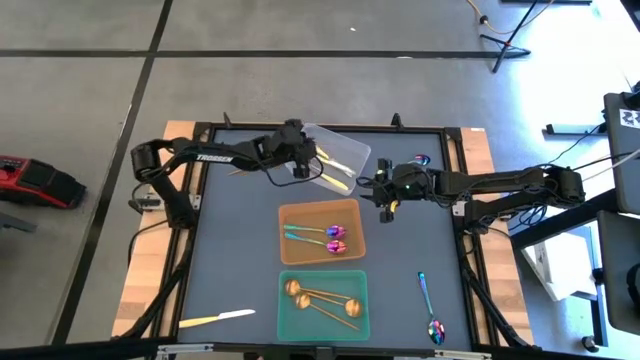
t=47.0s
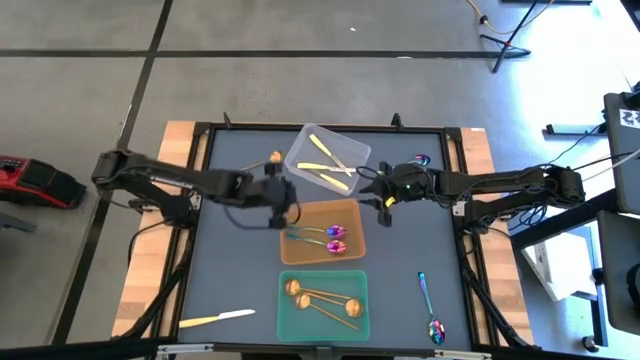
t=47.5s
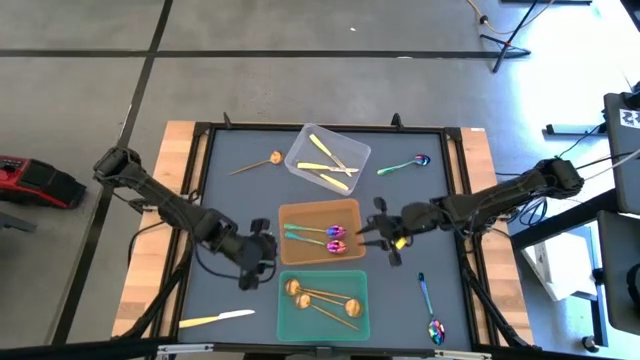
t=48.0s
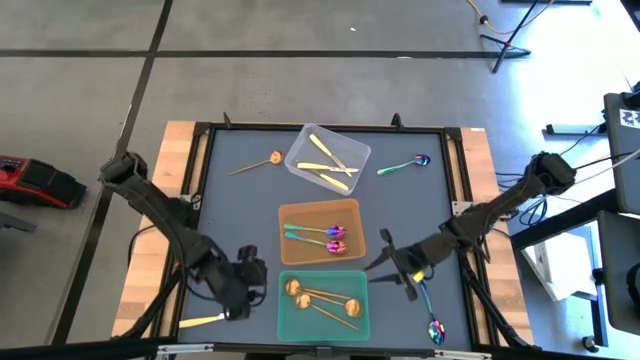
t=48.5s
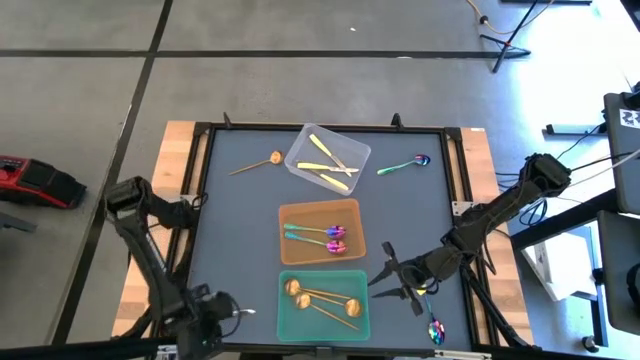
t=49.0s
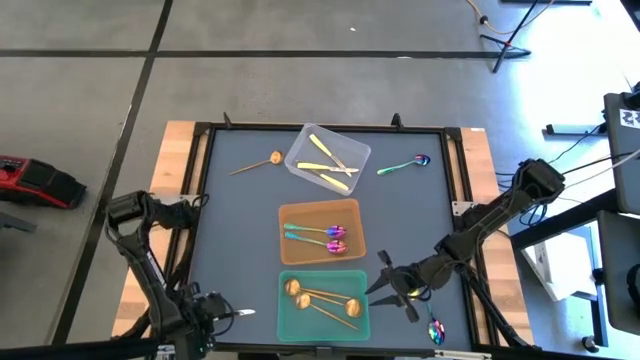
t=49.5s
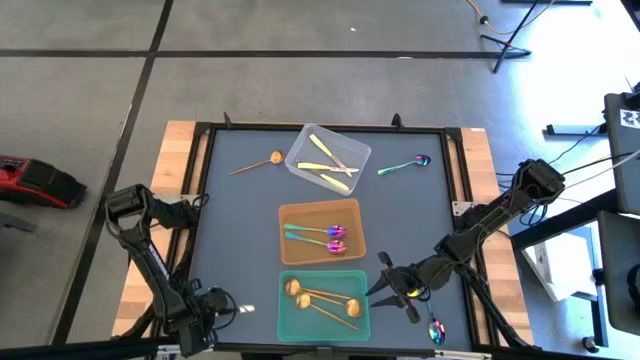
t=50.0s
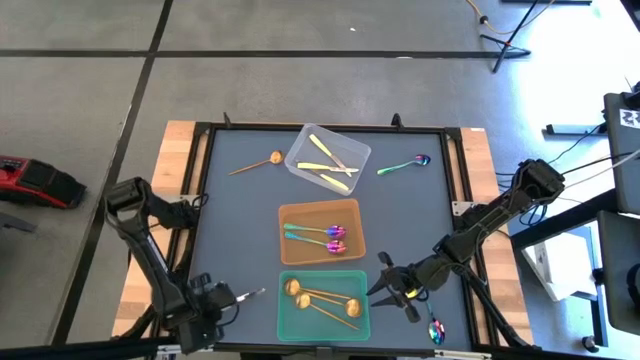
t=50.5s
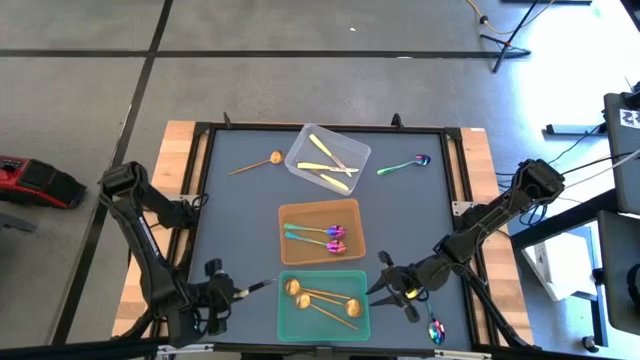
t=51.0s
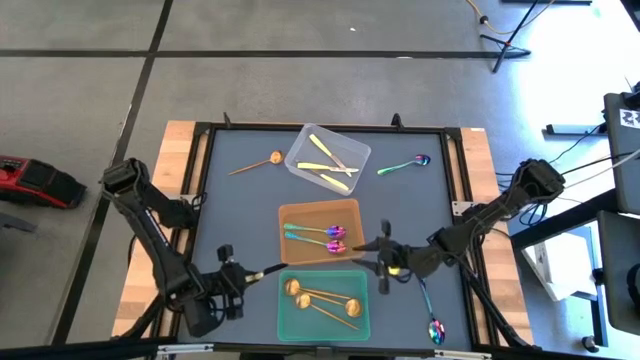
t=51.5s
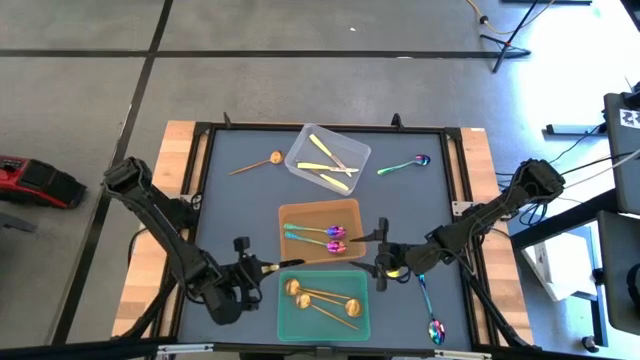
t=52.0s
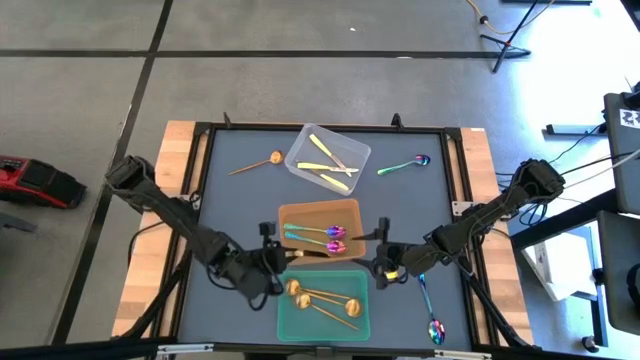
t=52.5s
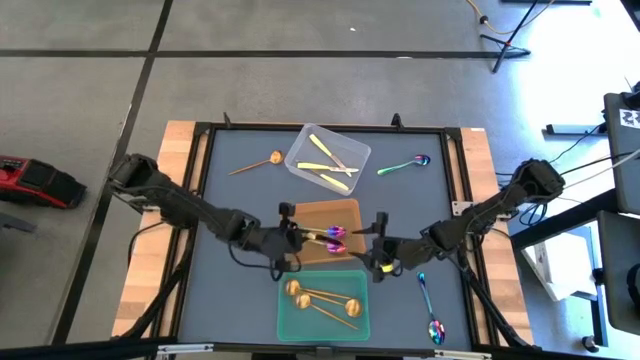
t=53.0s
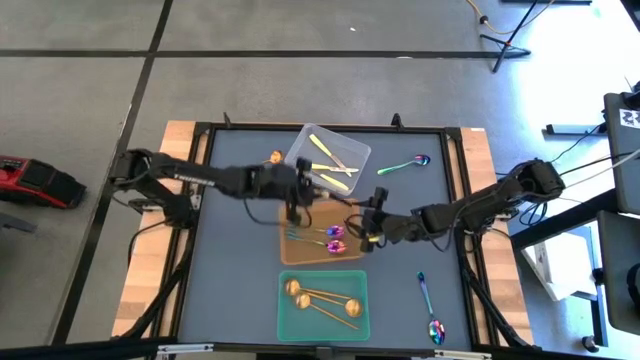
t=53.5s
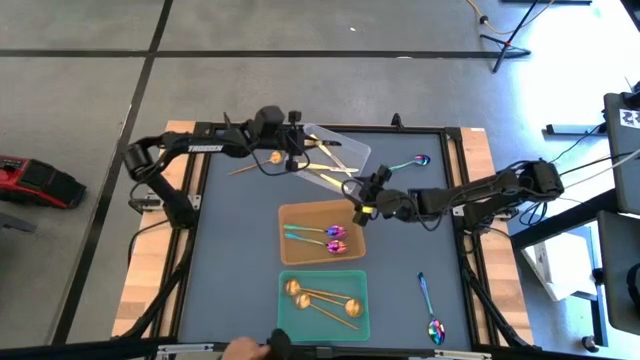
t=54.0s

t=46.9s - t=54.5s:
Task: Sort silverware by color (type)
Put the yellow knife into the transparent bin

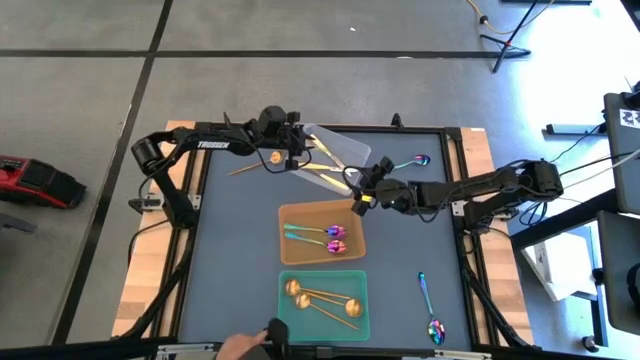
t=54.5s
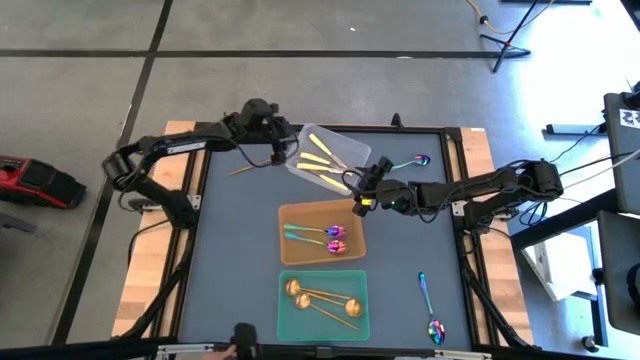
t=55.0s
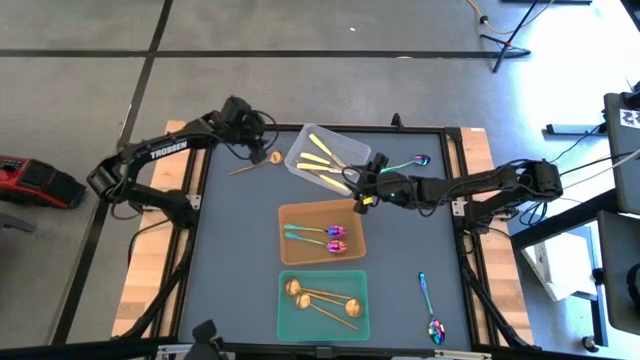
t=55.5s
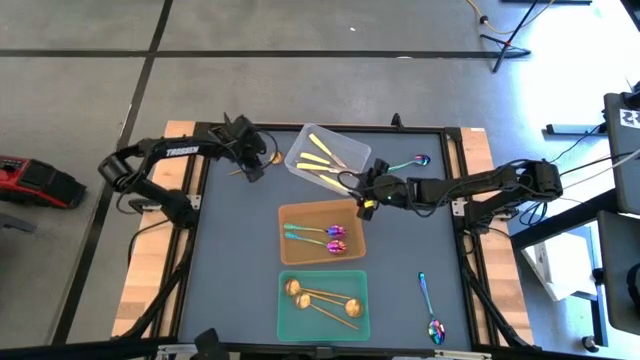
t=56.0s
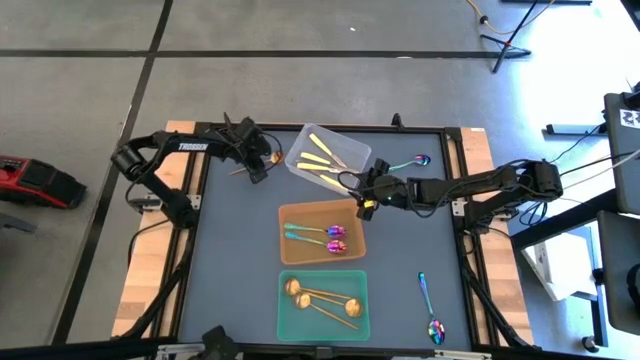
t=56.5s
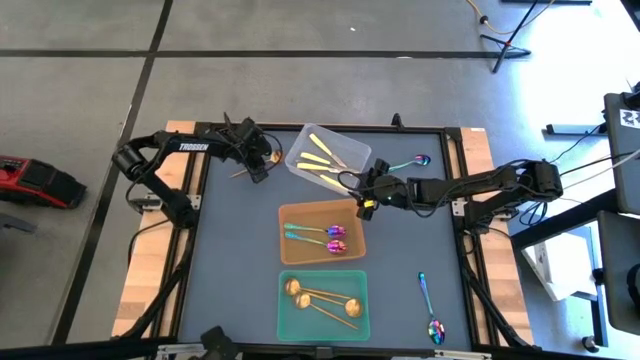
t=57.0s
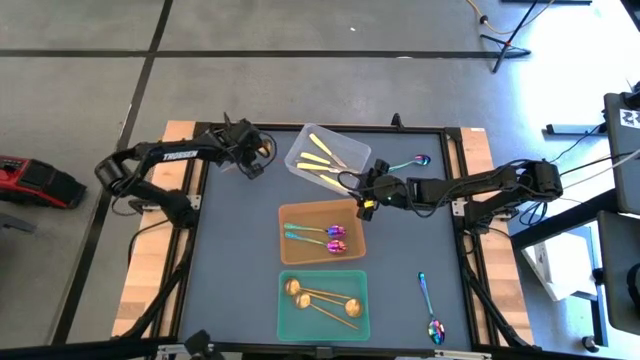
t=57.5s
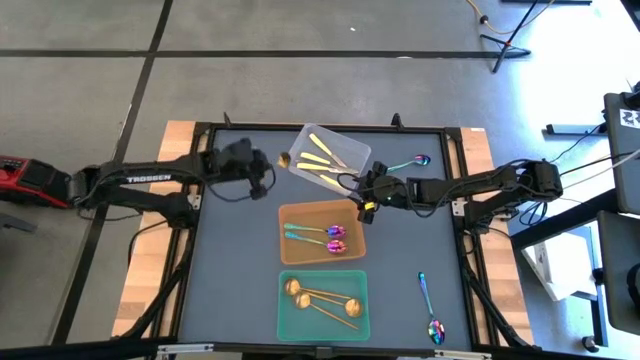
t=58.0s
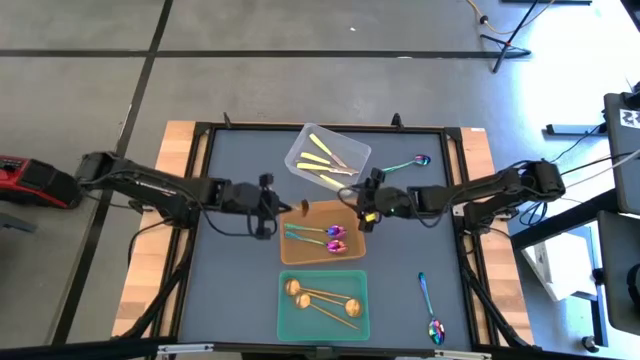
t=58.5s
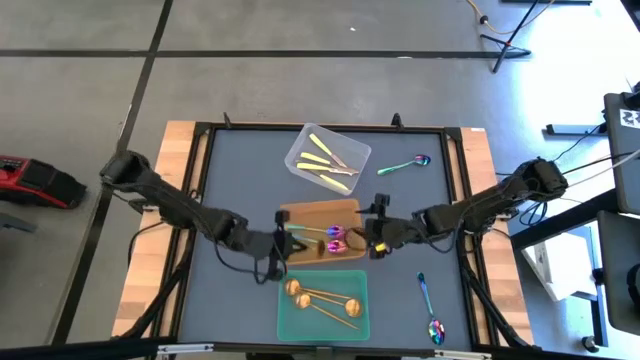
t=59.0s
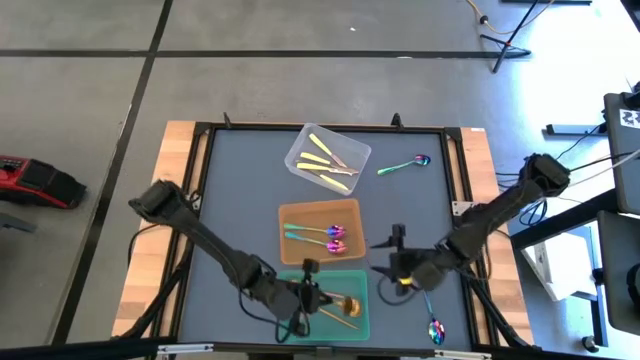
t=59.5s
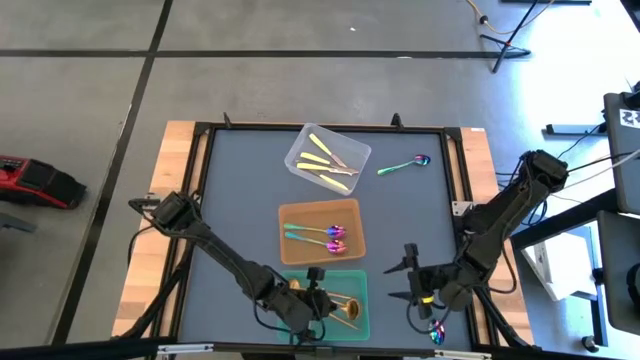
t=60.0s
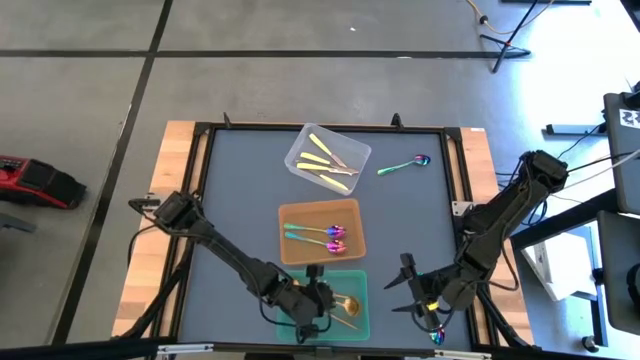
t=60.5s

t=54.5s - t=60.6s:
Put the gold spoon into the green bin

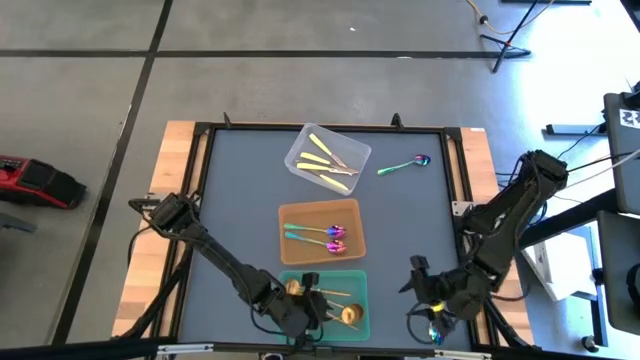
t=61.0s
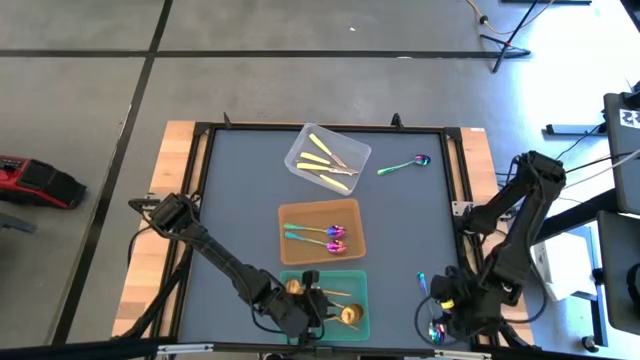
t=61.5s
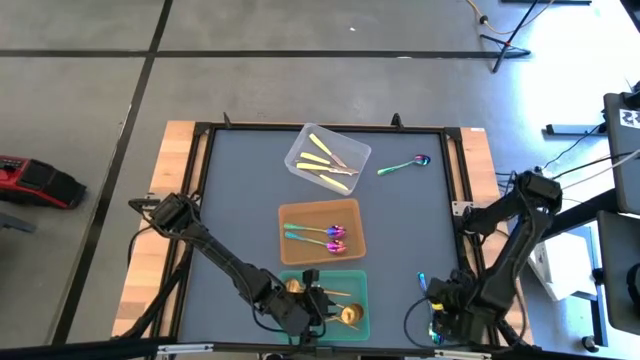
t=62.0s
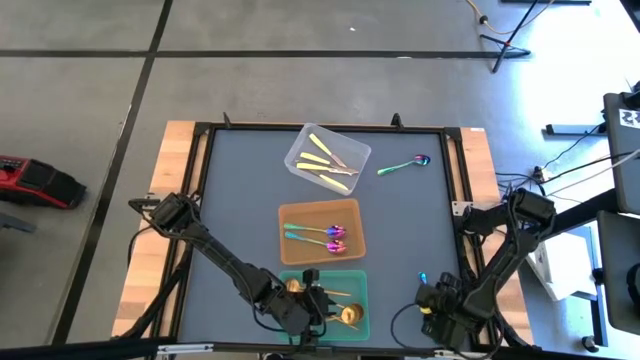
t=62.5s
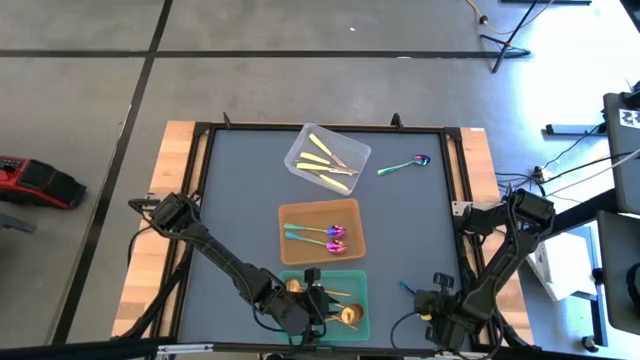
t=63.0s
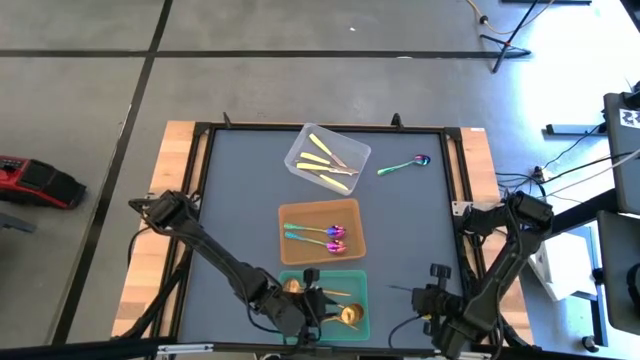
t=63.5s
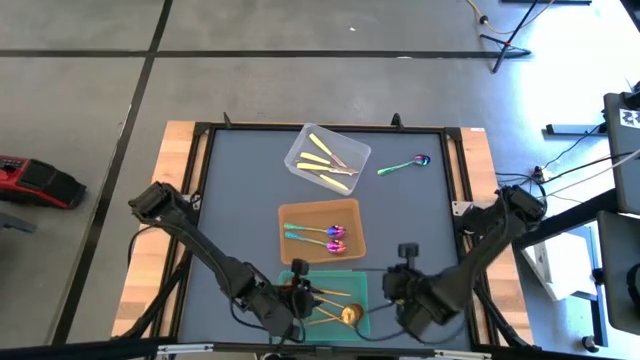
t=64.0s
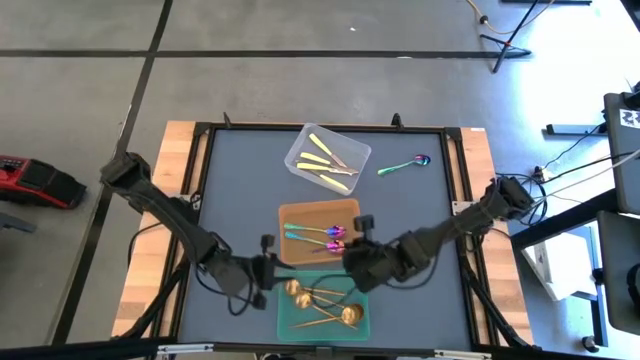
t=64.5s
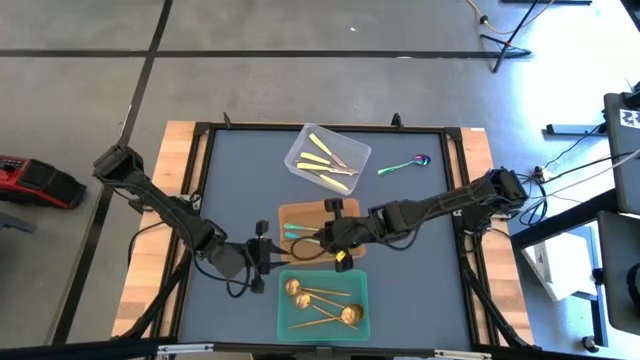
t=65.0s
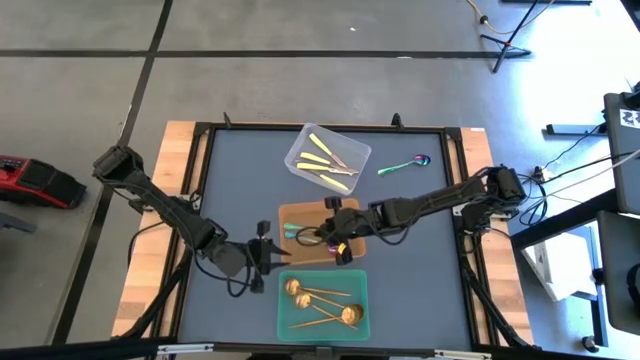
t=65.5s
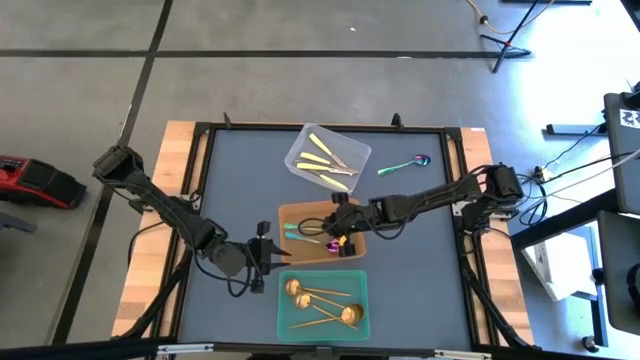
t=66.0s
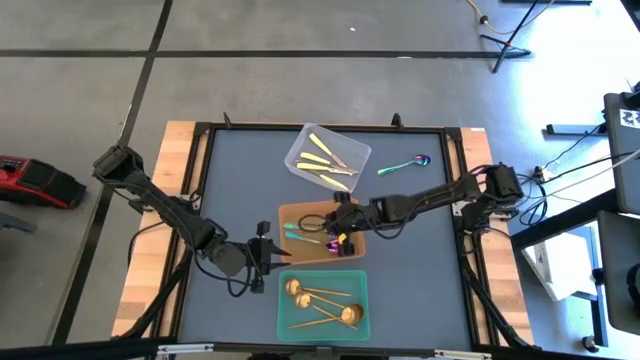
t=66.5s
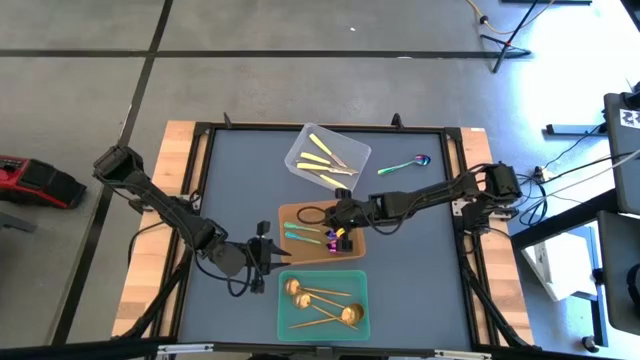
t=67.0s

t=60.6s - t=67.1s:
Put the purple spoon into the orange bin

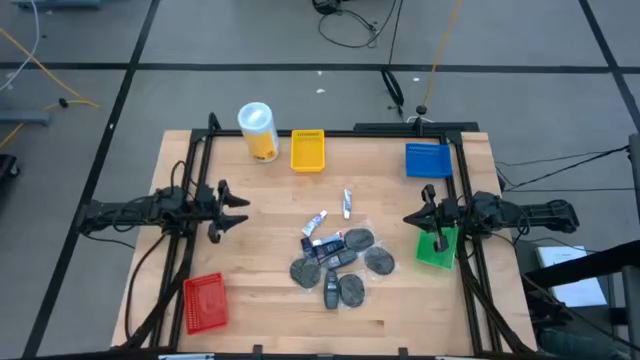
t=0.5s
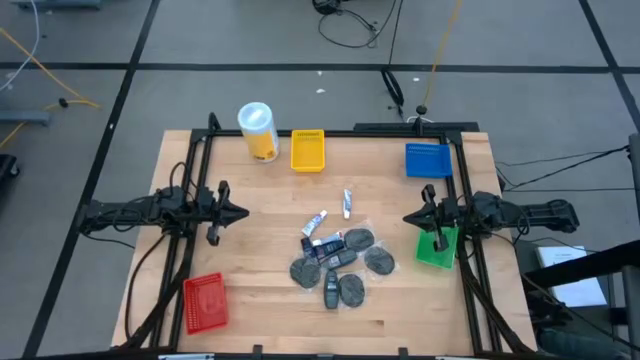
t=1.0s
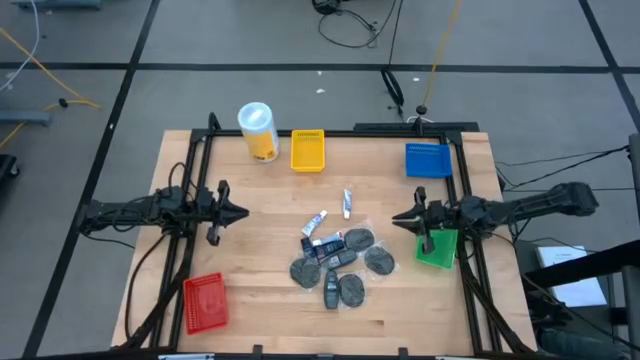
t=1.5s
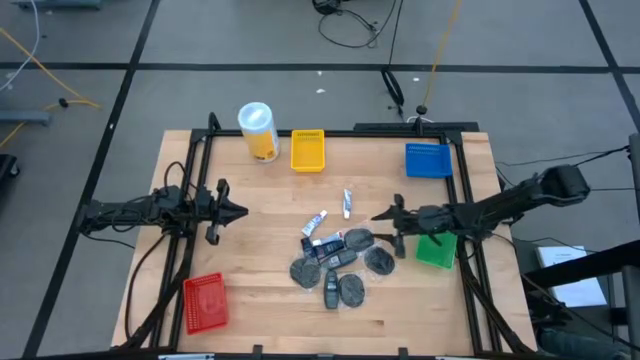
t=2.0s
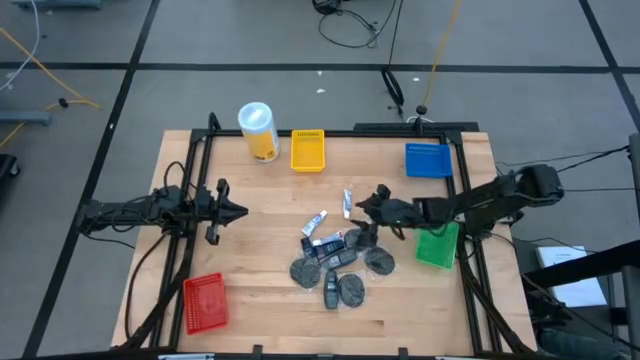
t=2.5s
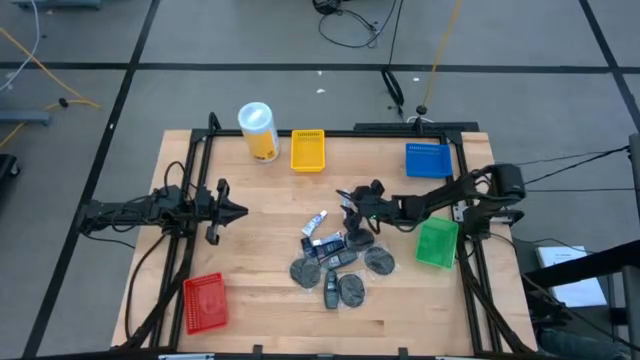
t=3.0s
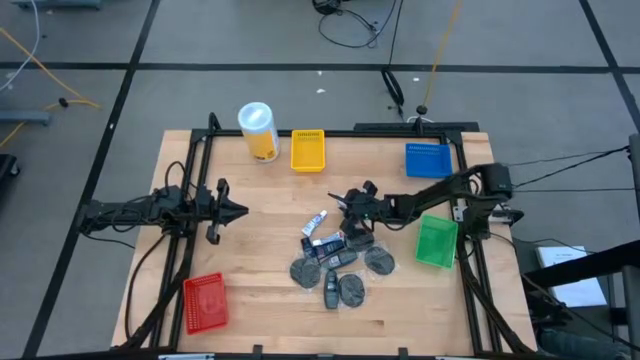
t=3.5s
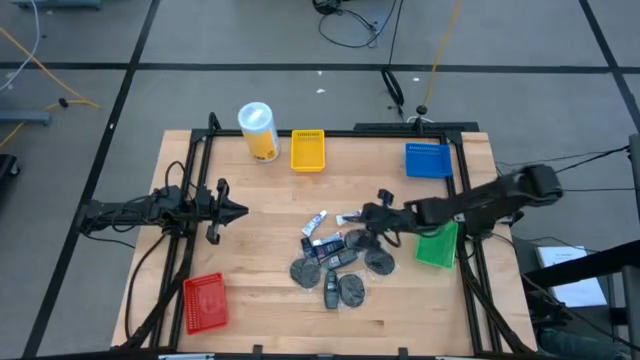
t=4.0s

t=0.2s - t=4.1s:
Task: Pick & Place Travel size toiletries
Put the toothpaste into the green bin
